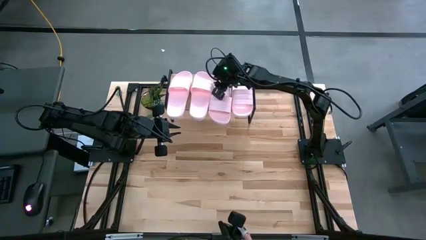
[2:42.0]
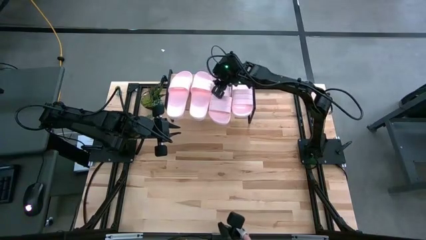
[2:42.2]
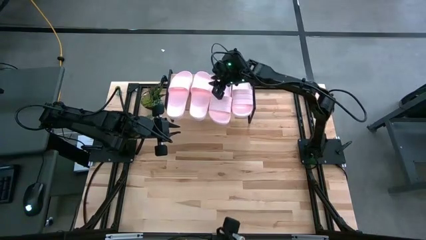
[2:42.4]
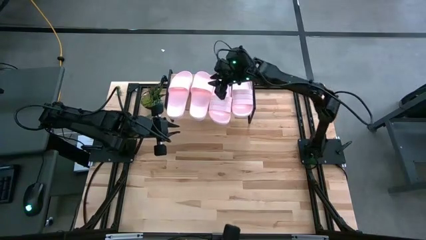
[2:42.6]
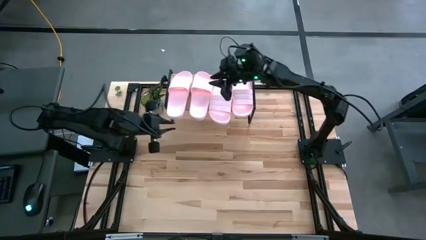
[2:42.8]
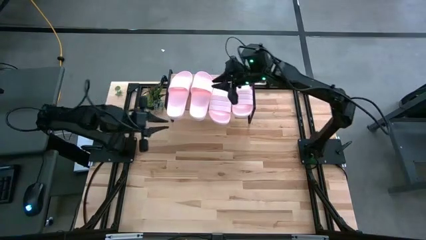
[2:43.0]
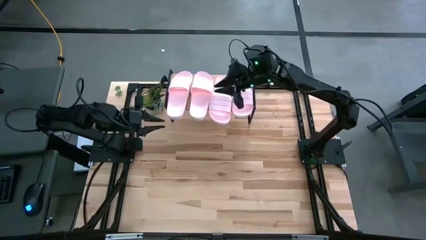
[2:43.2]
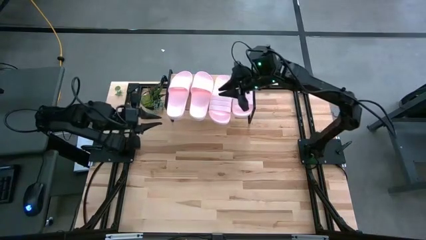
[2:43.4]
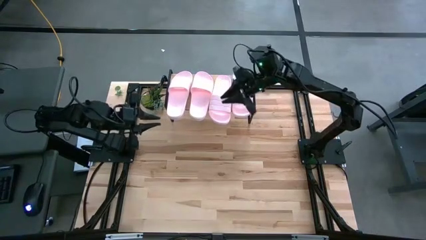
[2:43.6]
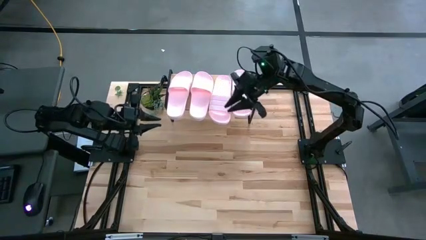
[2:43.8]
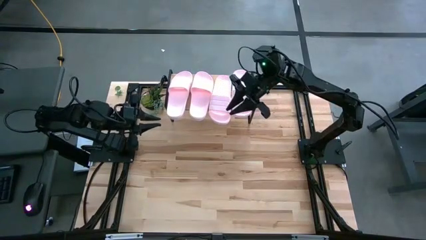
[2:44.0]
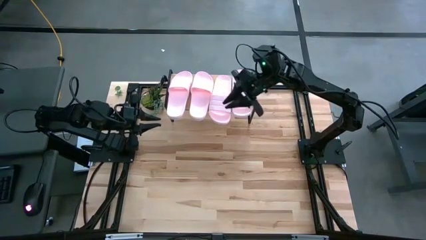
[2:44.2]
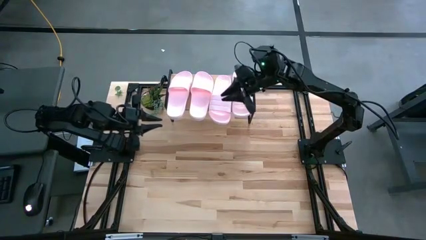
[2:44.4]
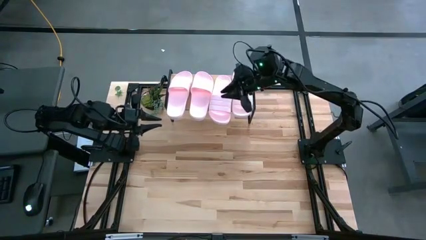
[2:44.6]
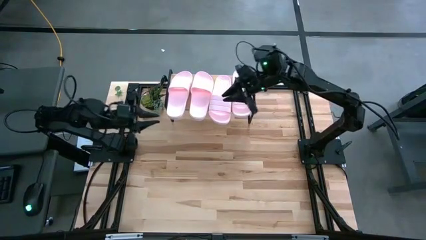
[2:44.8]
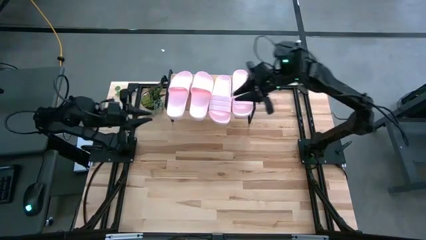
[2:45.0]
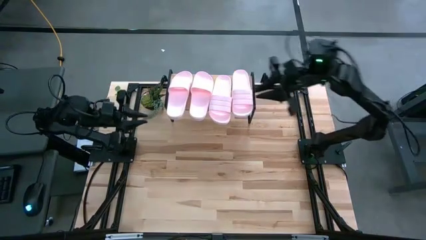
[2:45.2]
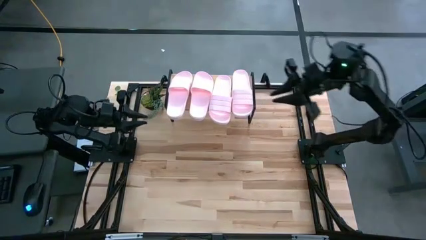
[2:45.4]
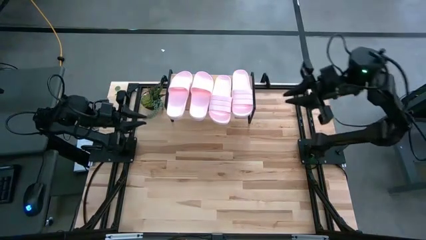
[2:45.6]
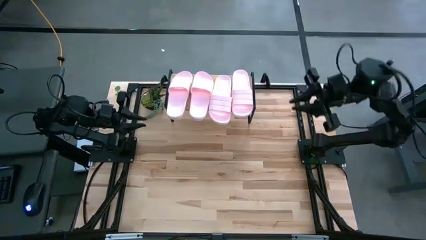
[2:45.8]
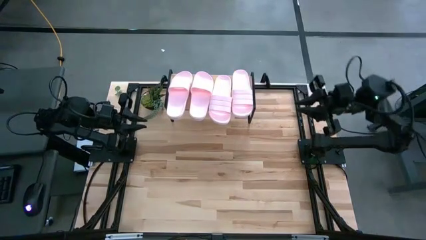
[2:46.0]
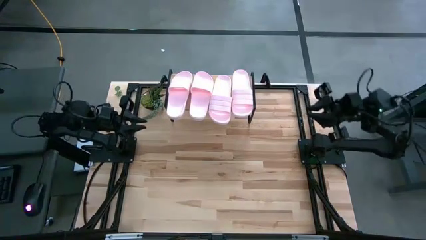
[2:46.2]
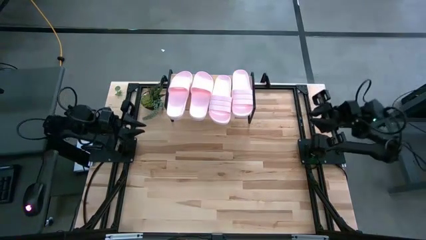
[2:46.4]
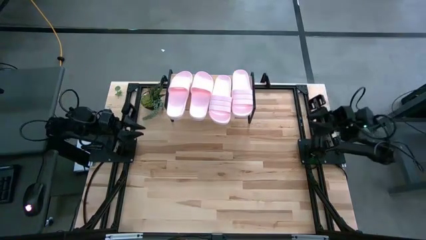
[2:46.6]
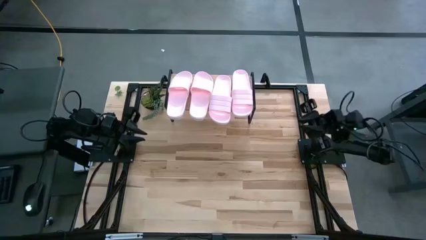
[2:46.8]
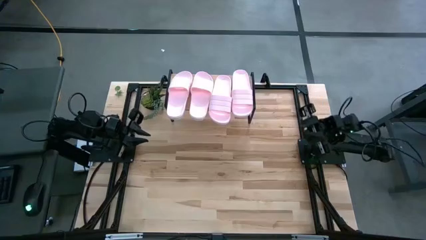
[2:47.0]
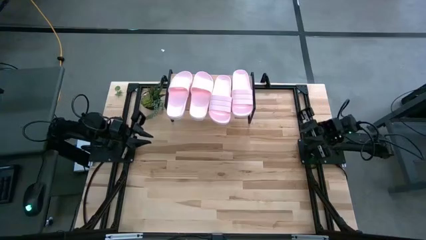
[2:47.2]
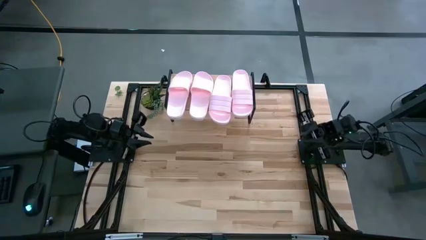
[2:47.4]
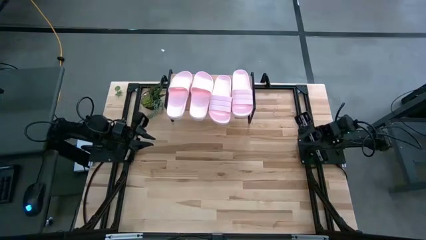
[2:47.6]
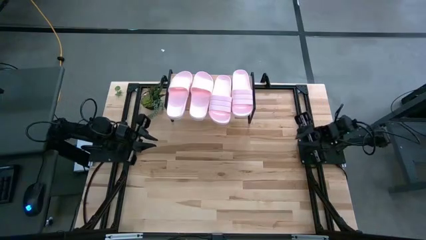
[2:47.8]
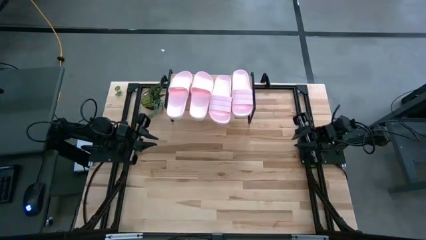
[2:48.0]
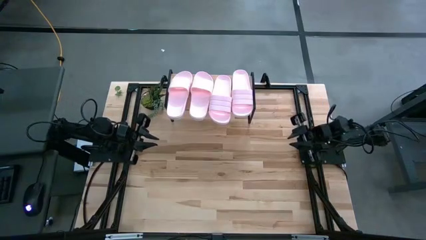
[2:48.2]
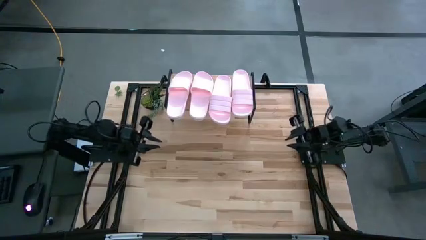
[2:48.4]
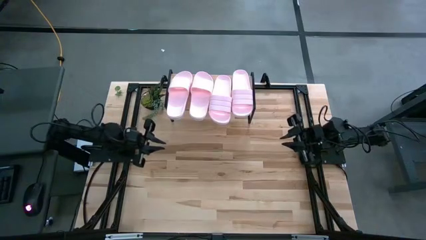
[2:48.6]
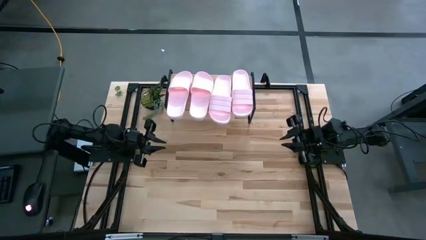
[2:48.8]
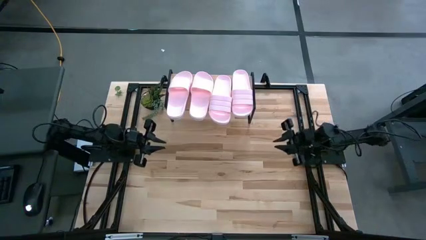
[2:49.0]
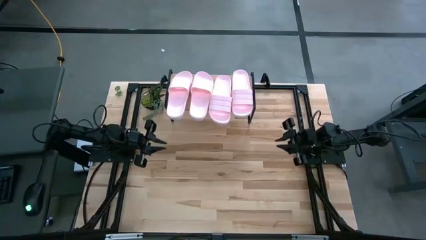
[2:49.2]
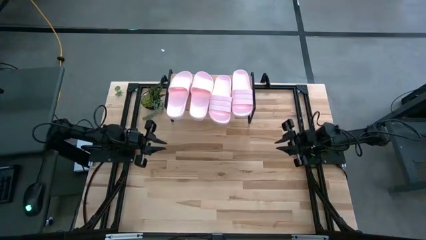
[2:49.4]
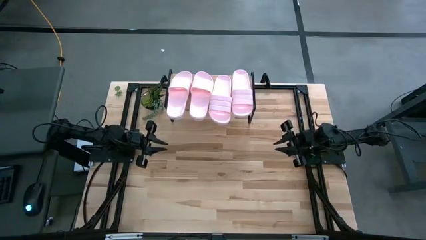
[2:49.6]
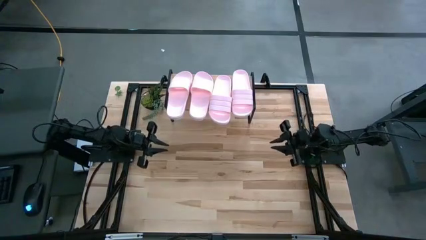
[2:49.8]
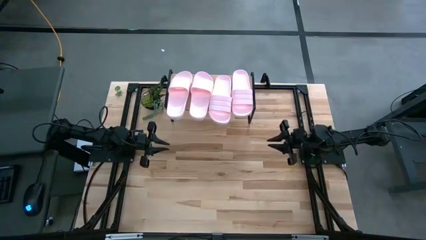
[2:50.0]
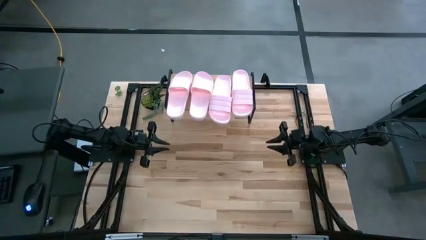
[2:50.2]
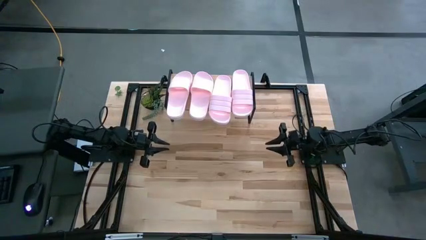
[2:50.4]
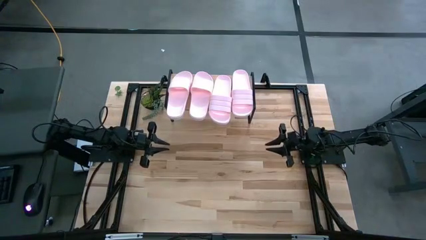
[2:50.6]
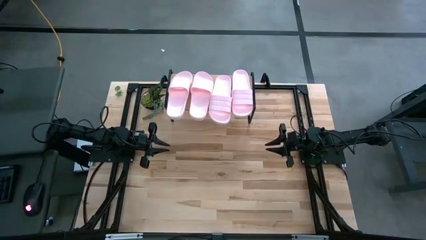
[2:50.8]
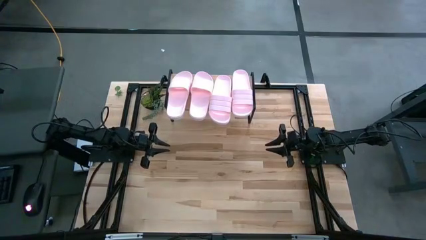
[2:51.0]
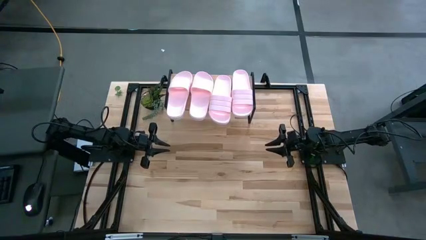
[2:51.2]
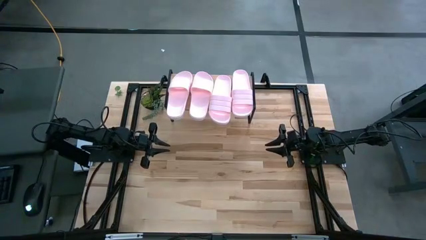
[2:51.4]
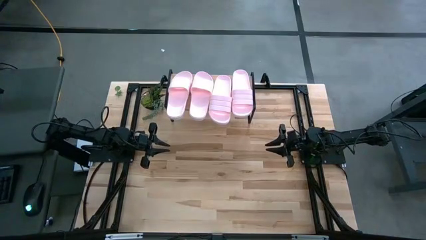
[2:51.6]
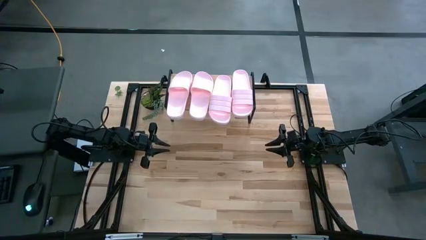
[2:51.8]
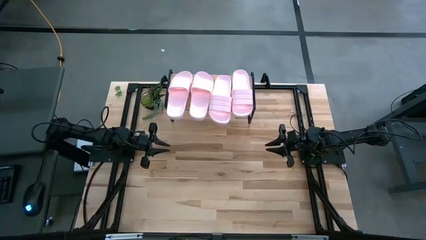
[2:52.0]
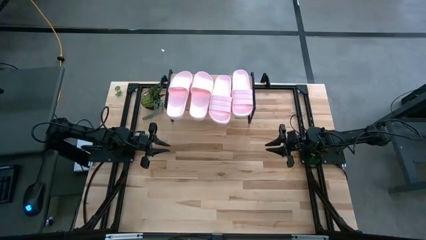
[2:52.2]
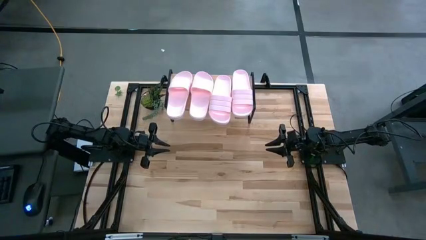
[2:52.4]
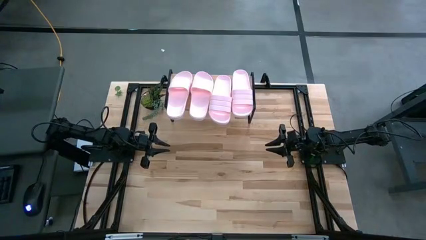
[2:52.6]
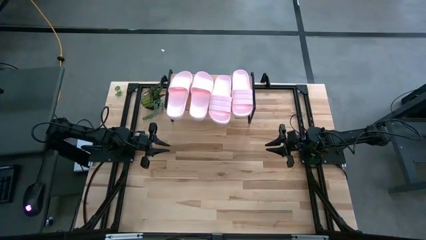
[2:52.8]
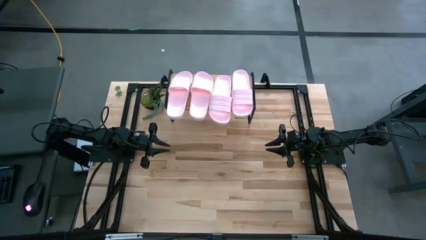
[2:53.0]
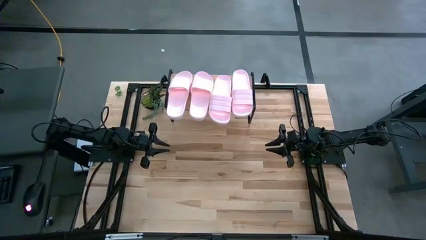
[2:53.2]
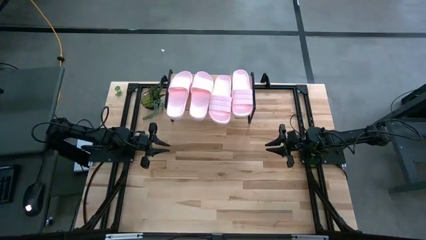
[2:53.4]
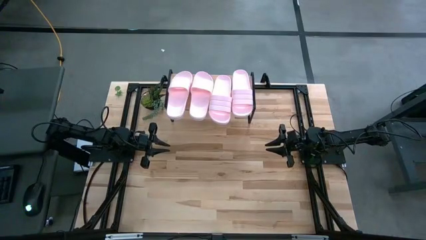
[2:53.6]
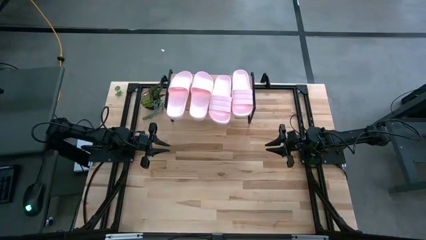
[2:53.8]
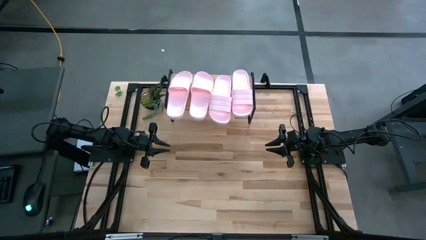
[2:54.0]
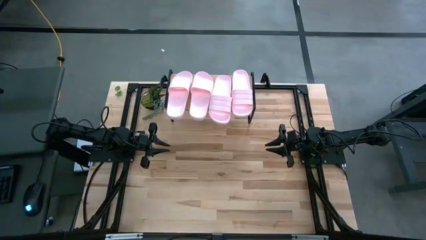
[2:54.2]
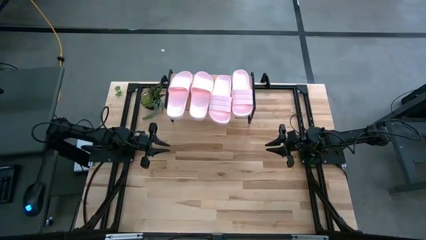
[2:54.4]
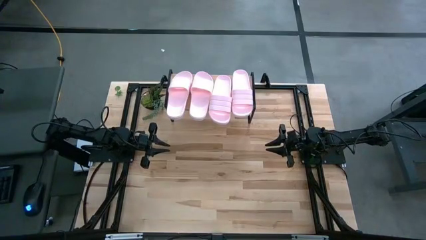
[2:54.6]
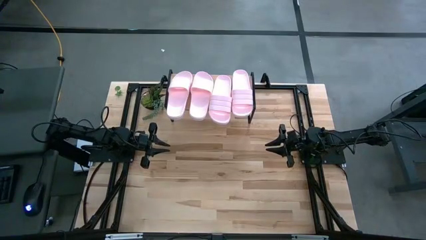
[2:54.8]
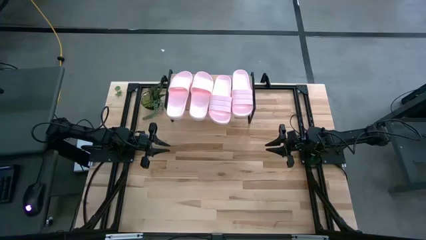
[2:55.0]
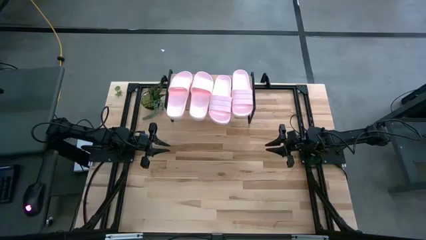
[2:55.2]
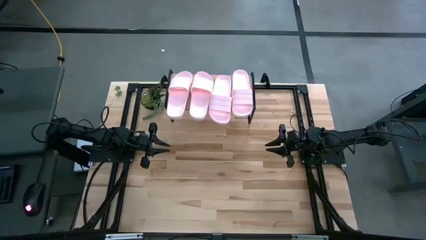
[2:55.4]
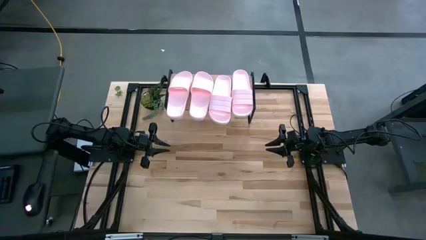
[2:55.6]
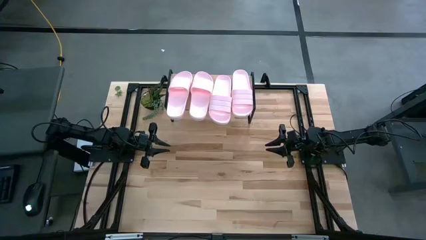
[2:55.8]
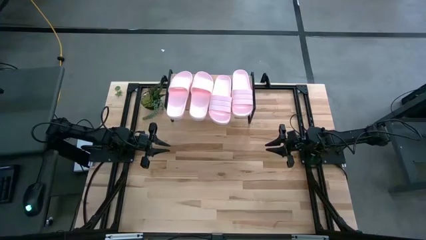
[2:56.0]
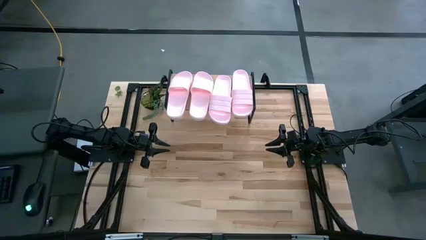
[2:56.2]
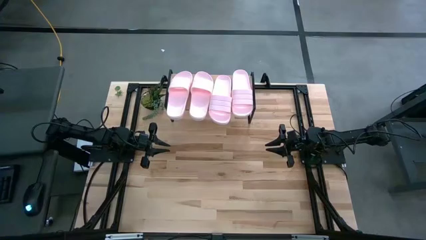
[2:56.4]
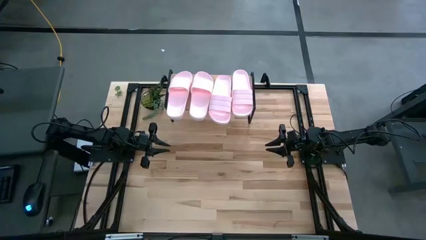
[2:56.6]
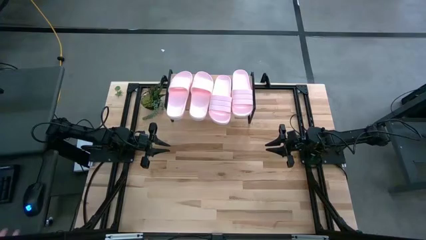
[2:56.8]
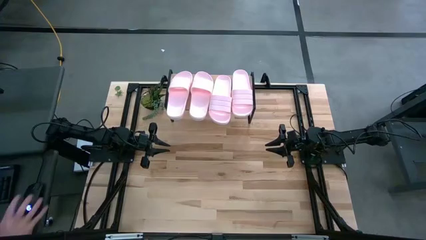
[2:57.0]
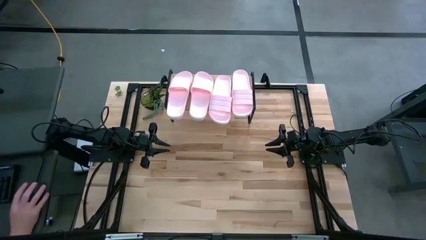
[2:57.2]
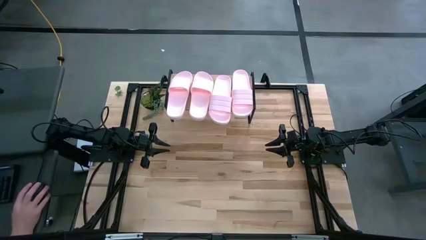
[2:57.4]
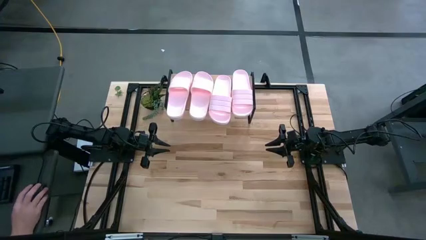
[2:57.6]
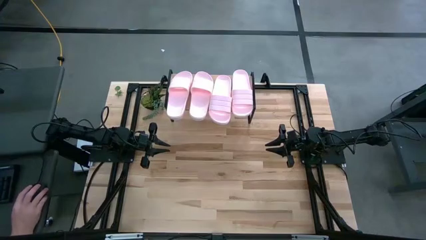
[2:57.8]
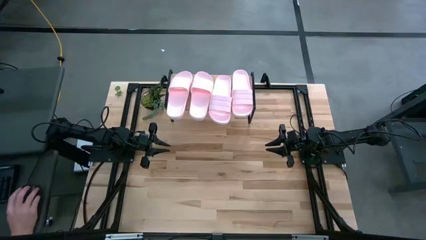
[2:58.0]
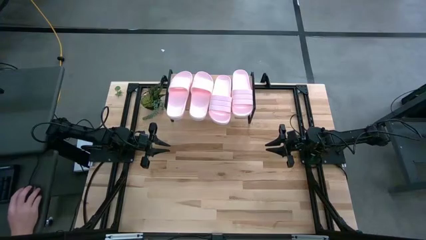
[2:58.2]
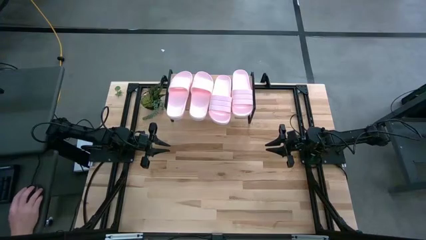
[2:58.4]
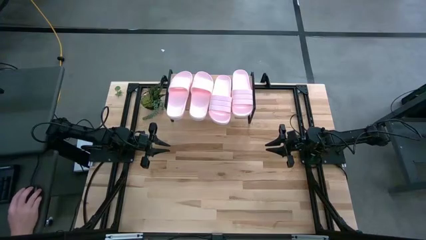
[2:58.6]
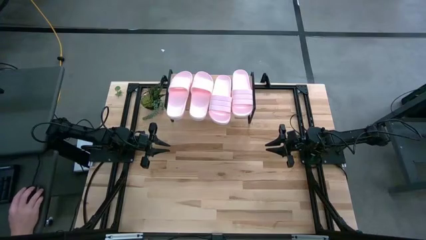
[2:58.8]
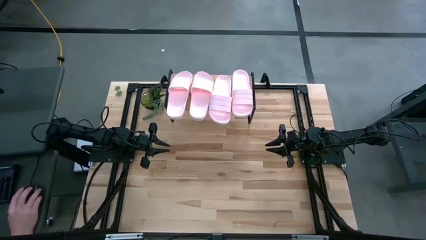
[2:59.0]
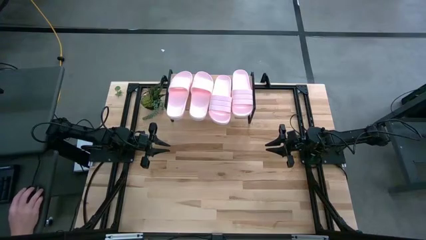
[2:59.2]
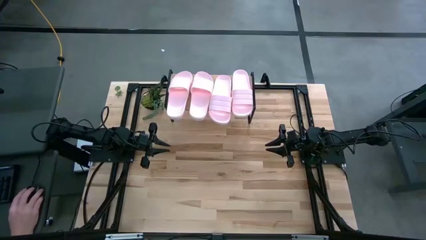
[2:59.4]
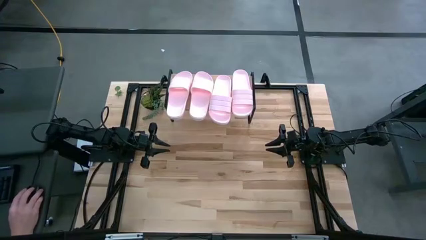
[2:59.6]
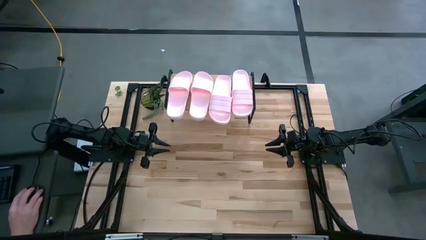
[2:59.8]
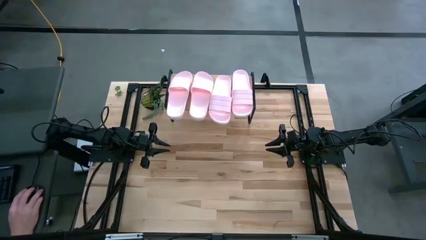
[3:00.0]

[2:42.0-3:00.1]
Task: Pick and place slides into the shelf
Return to Home Position
